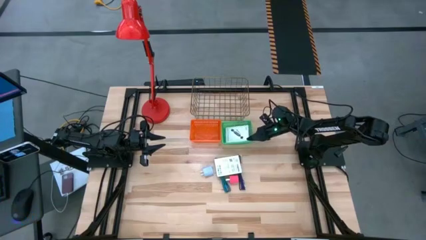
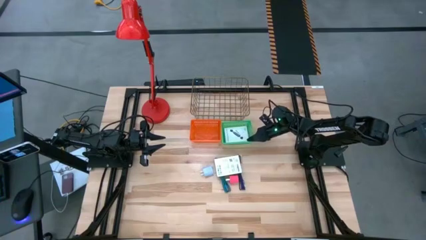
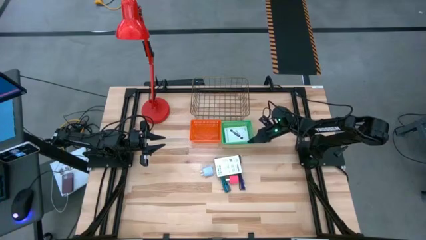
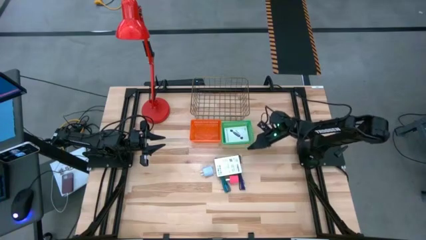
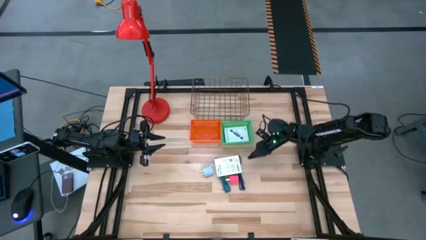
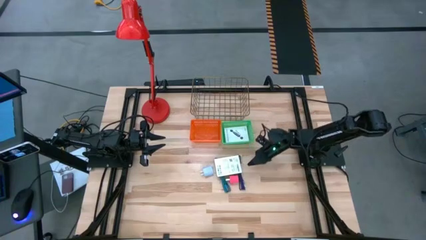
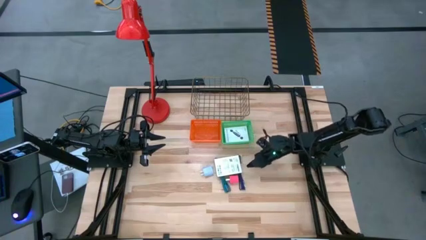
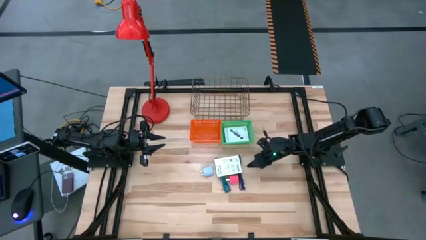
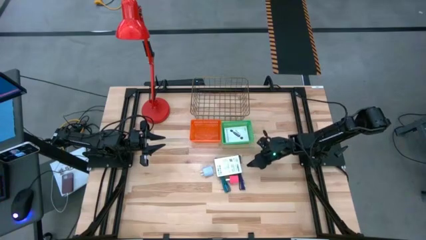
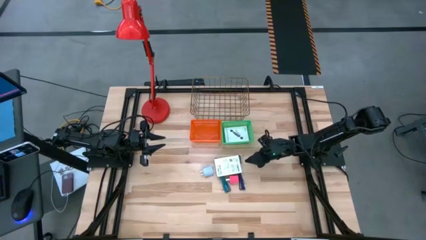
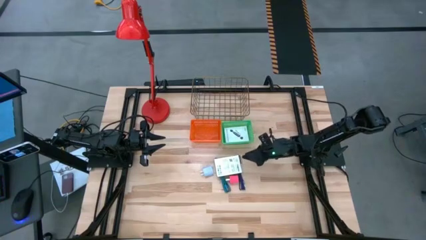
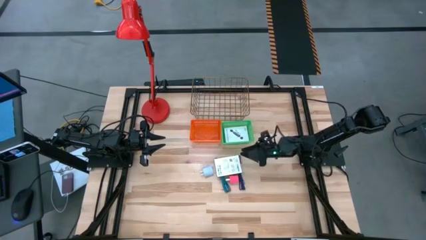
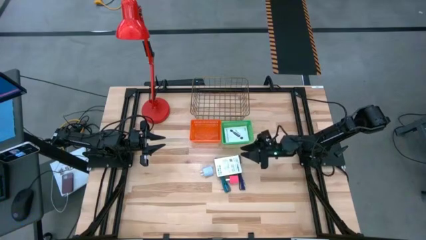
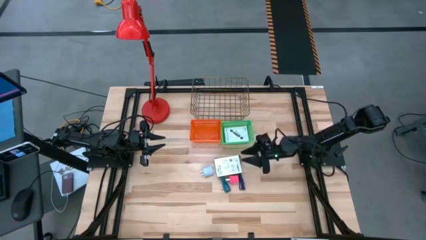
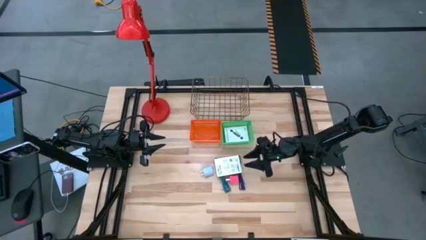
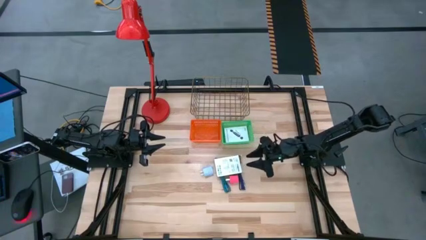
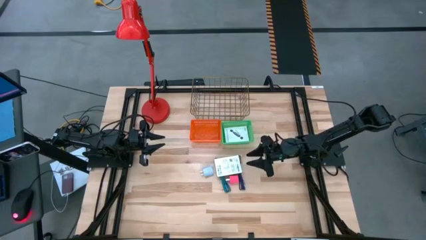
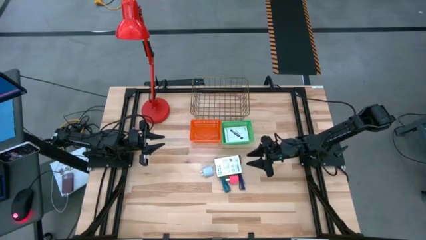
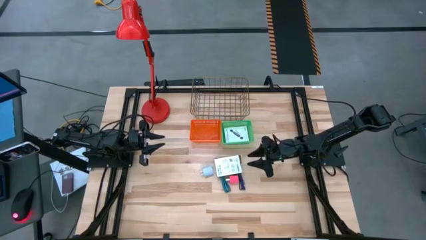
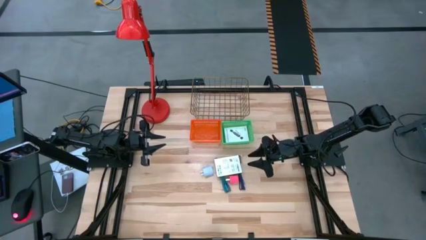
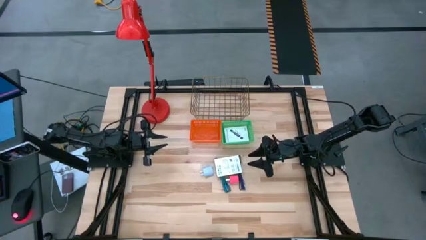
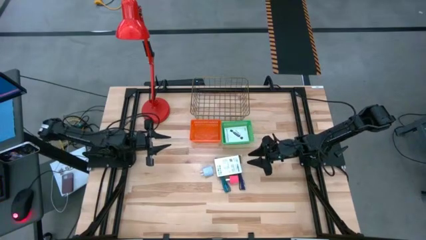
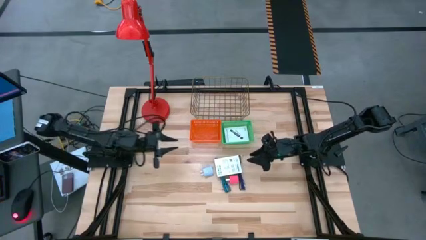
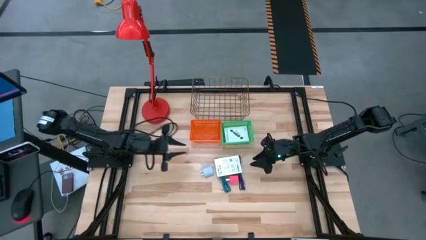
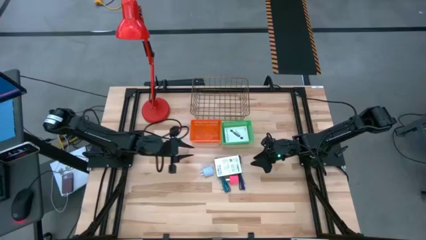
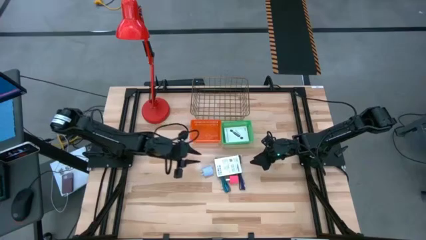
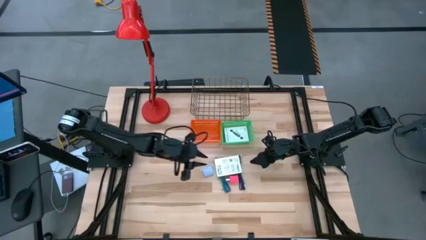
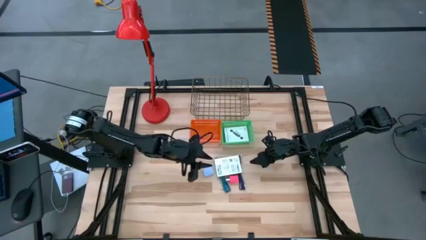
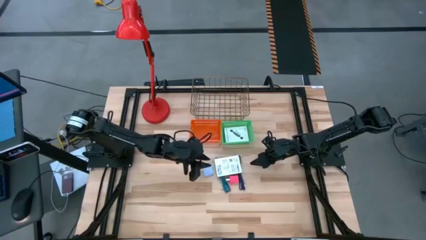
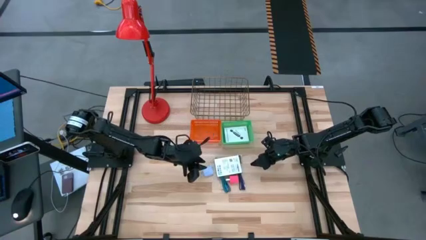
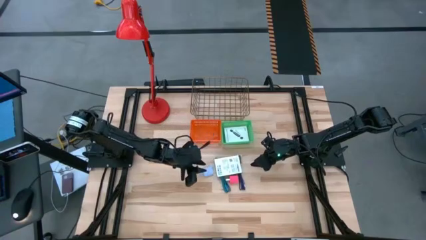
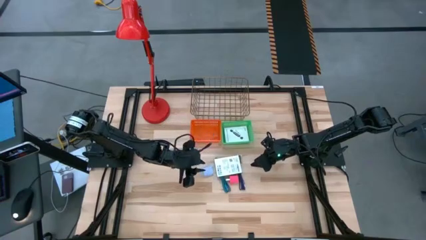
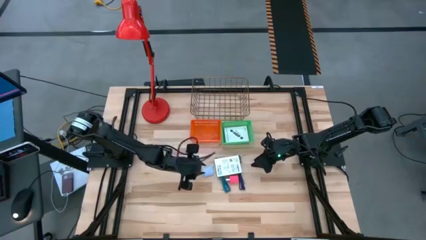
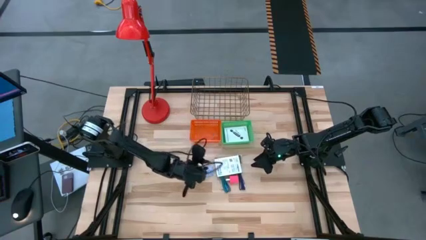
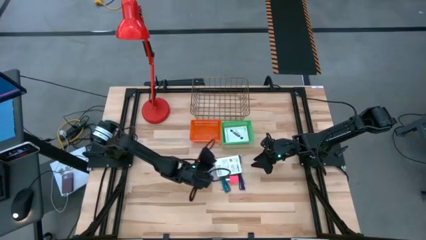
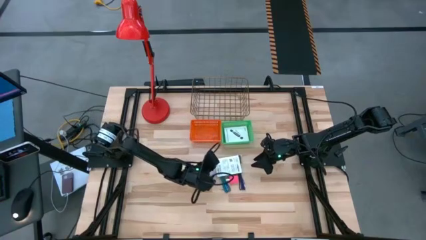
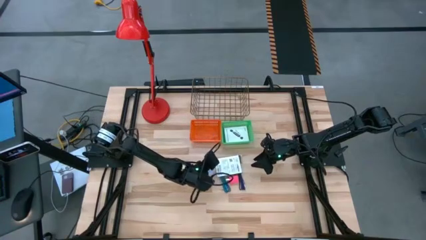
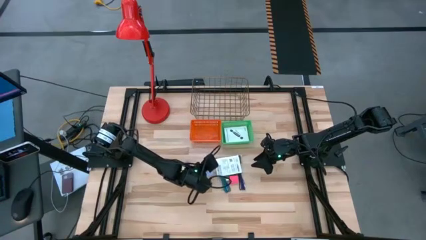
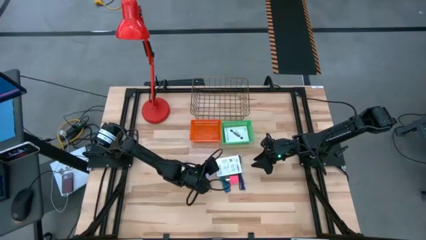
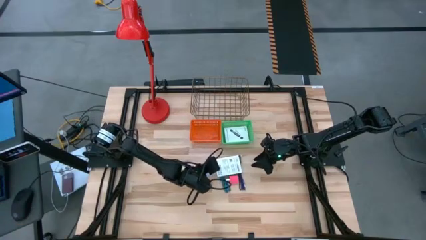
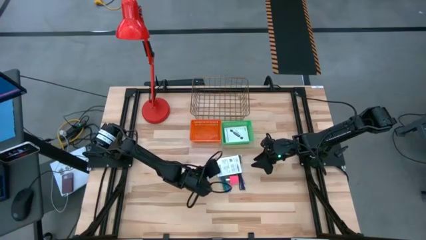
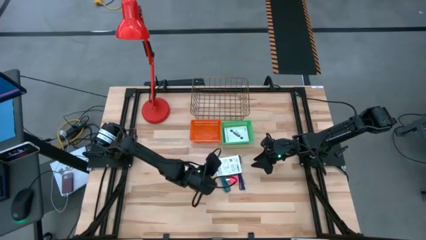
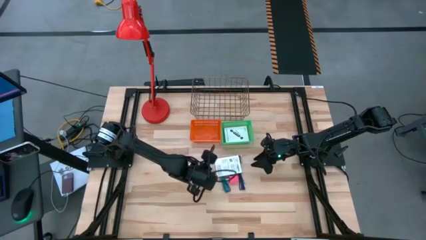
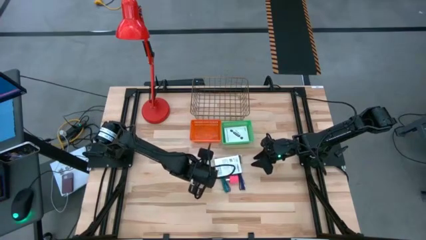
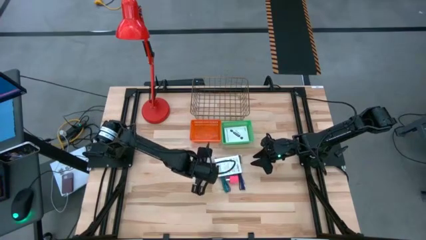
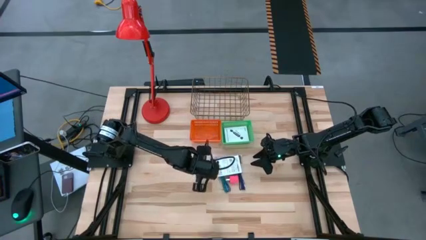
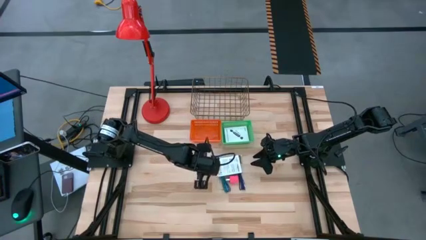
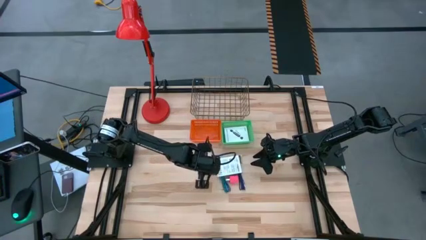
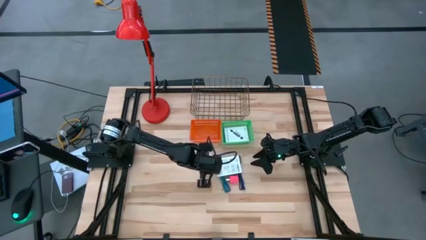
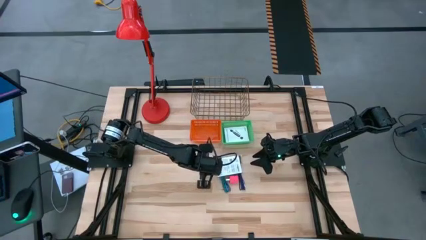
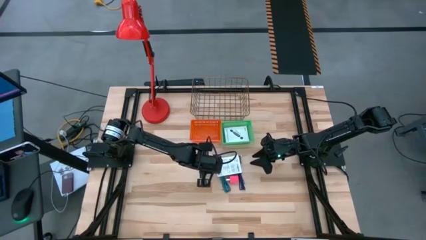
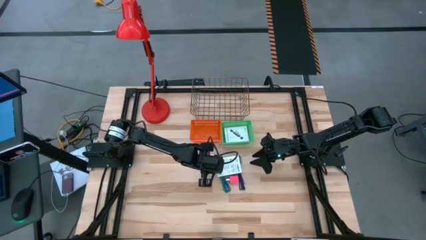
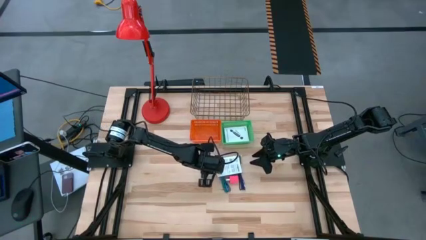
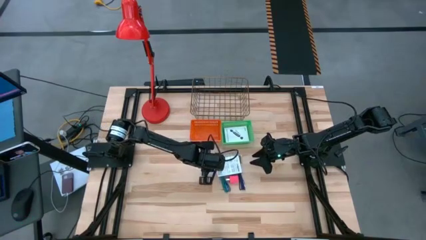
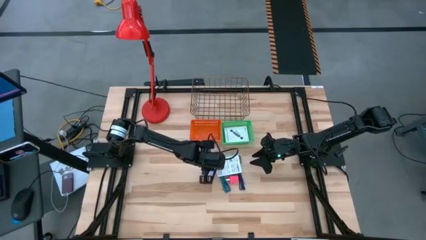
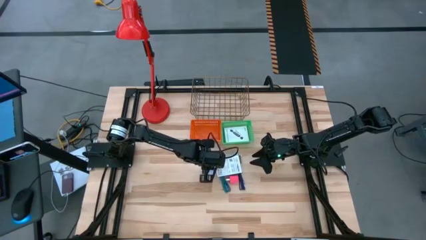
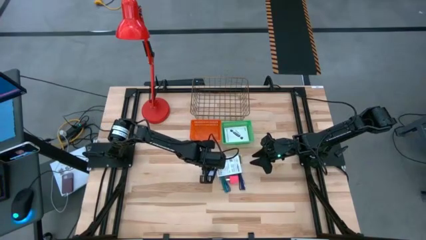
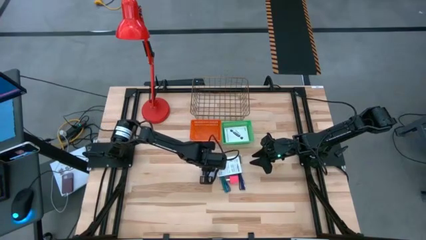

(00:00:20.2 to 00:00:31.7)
Task: Pick and place items into bin
Stack the card reader box on top of the card reader box in the green bin
